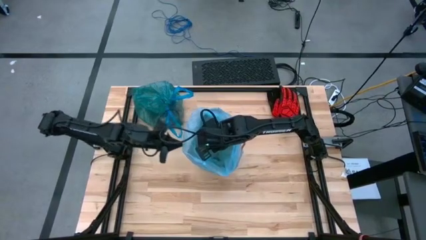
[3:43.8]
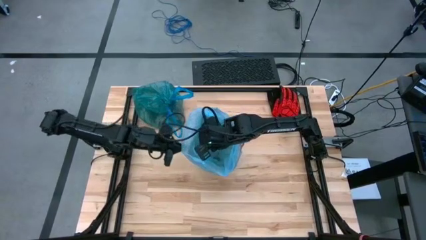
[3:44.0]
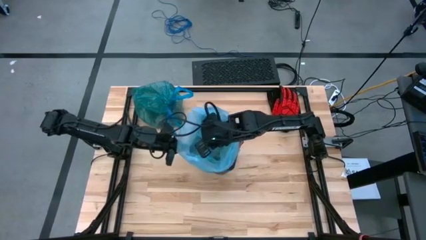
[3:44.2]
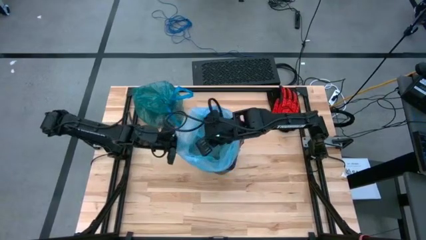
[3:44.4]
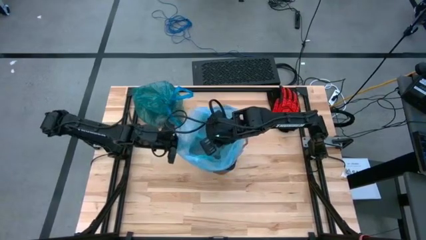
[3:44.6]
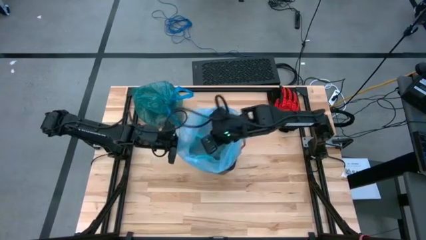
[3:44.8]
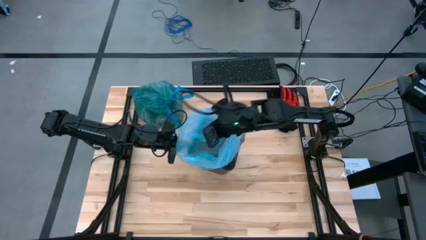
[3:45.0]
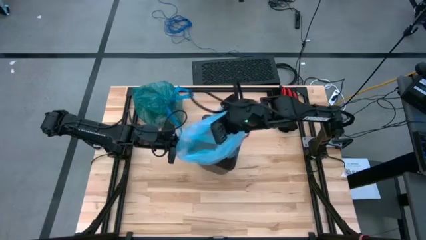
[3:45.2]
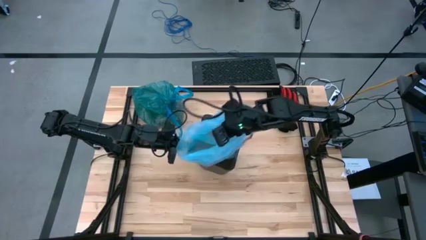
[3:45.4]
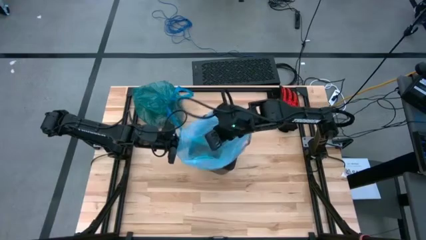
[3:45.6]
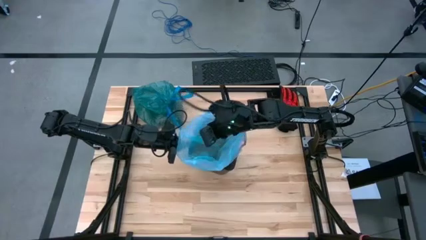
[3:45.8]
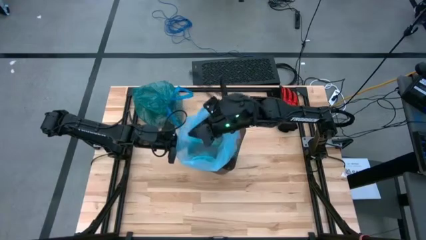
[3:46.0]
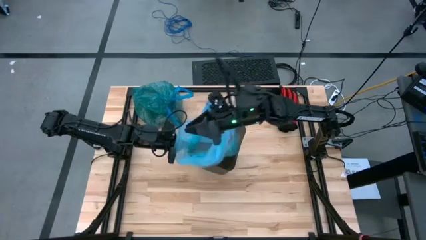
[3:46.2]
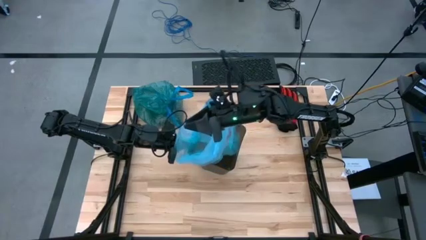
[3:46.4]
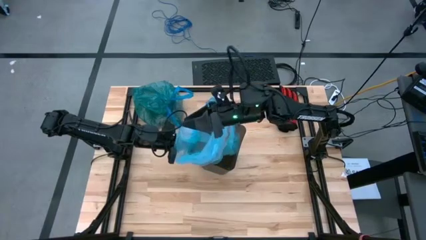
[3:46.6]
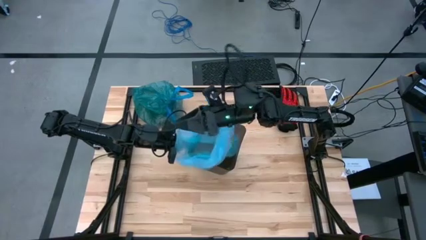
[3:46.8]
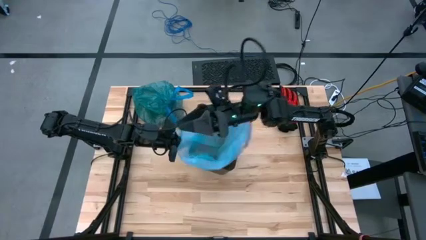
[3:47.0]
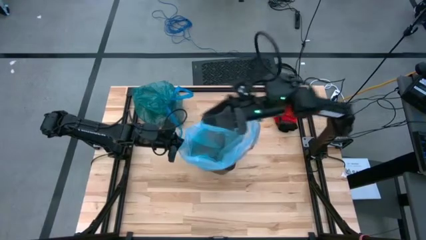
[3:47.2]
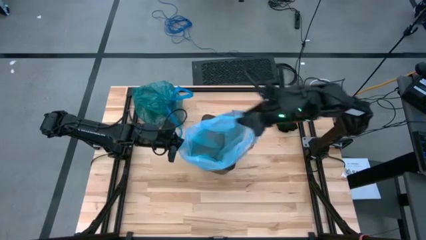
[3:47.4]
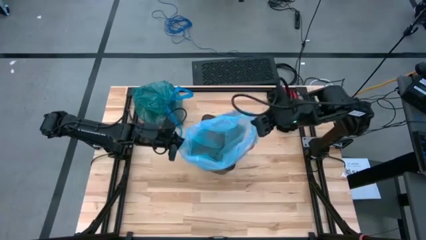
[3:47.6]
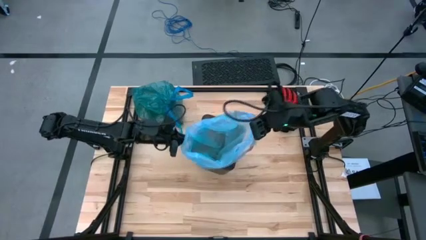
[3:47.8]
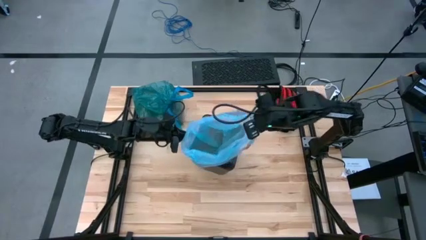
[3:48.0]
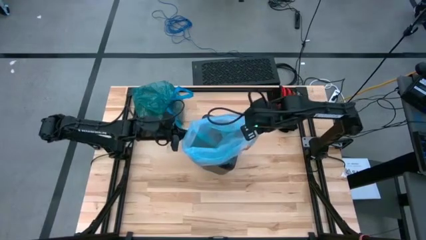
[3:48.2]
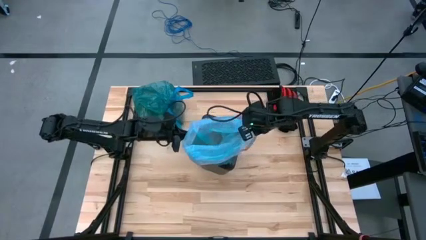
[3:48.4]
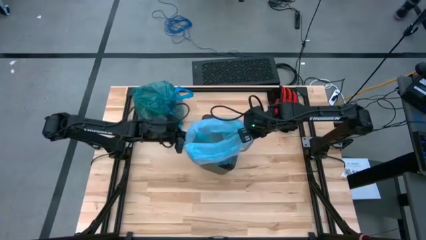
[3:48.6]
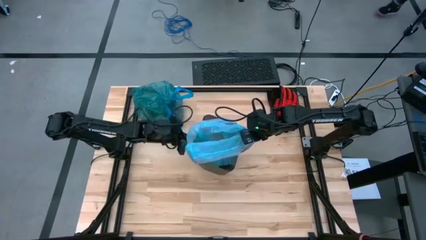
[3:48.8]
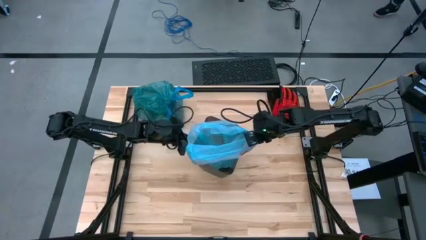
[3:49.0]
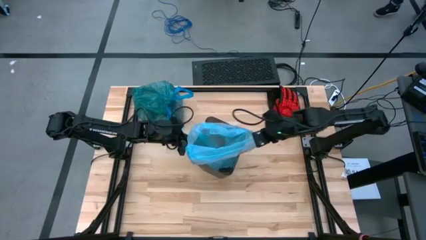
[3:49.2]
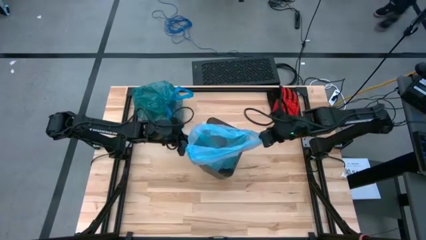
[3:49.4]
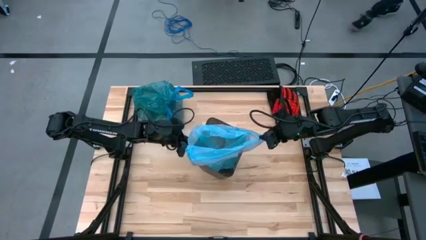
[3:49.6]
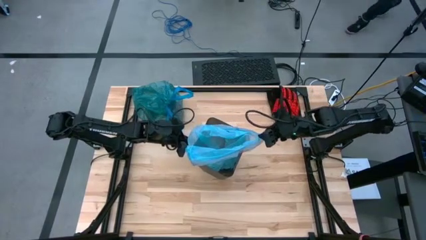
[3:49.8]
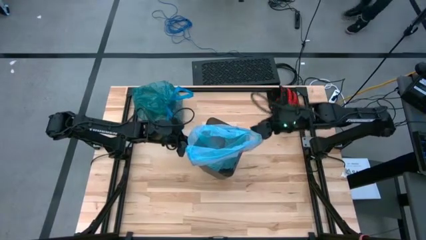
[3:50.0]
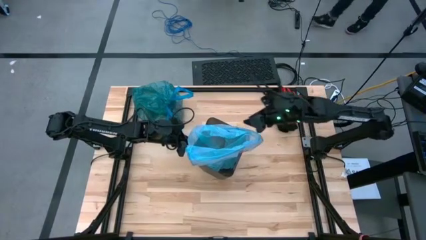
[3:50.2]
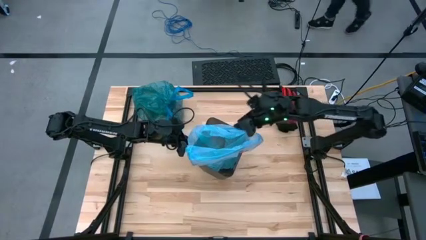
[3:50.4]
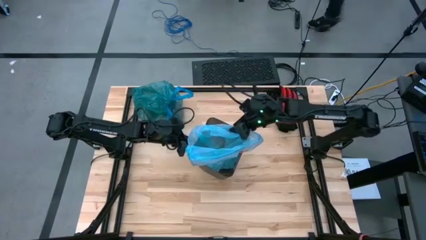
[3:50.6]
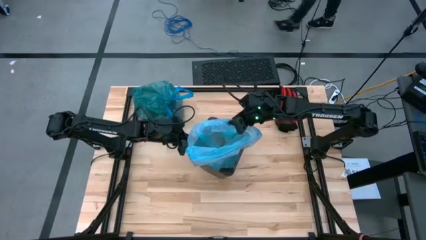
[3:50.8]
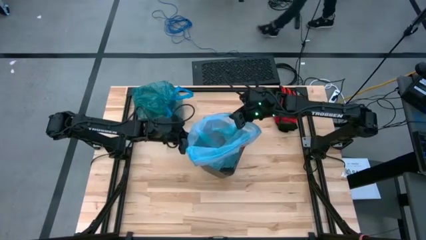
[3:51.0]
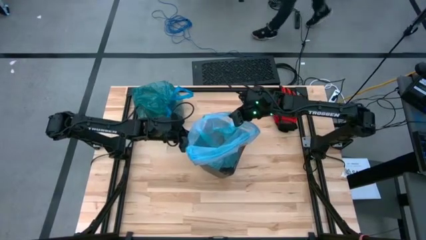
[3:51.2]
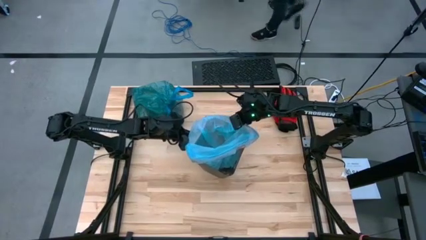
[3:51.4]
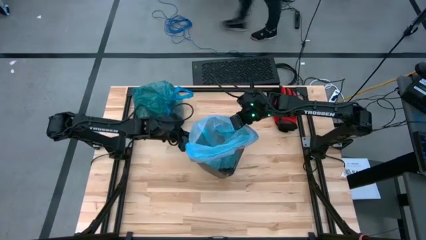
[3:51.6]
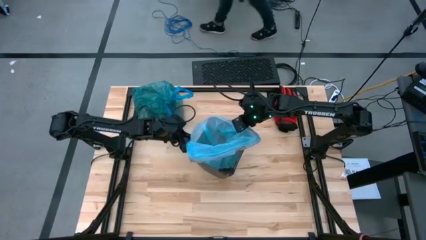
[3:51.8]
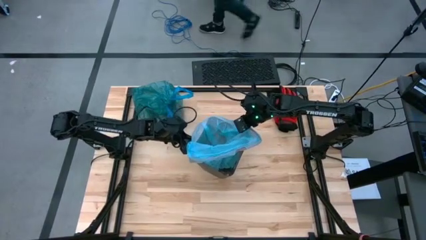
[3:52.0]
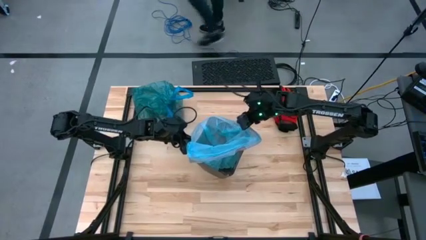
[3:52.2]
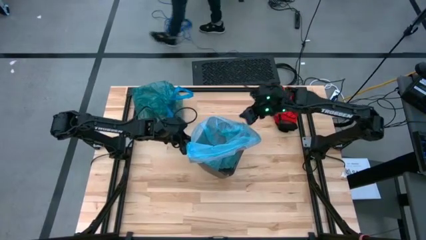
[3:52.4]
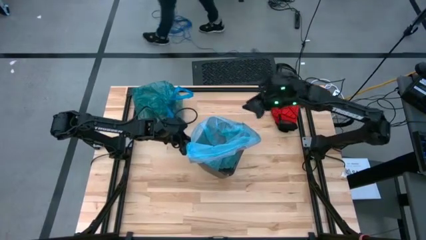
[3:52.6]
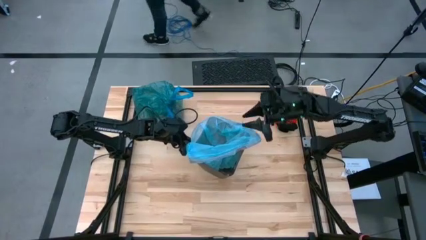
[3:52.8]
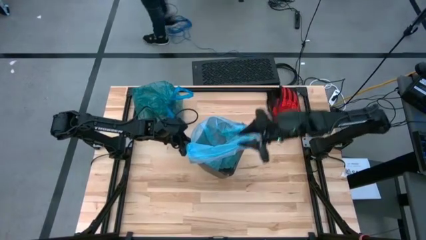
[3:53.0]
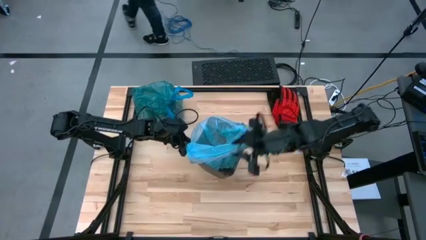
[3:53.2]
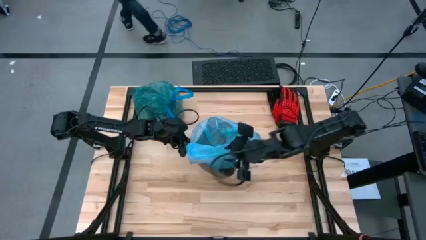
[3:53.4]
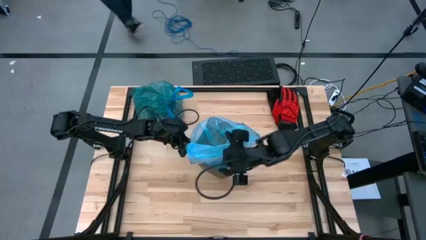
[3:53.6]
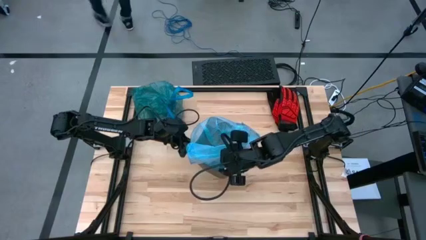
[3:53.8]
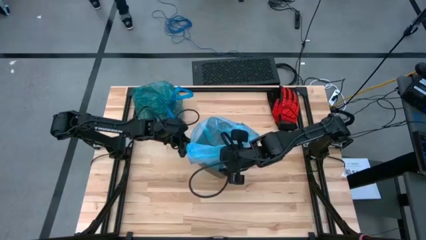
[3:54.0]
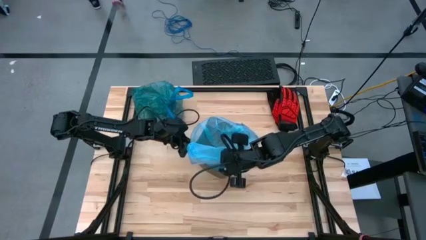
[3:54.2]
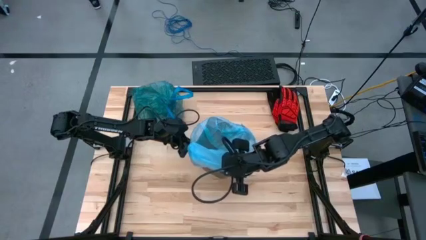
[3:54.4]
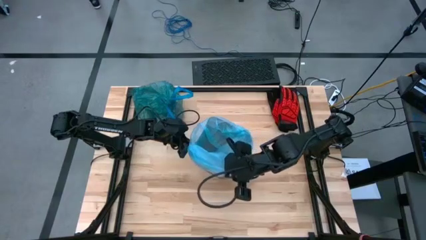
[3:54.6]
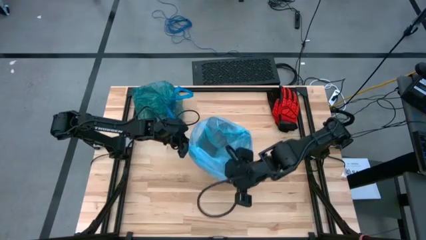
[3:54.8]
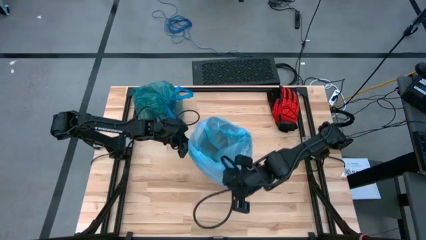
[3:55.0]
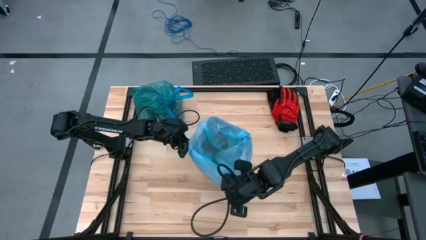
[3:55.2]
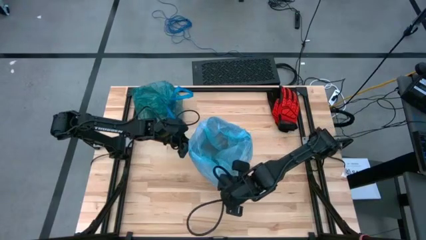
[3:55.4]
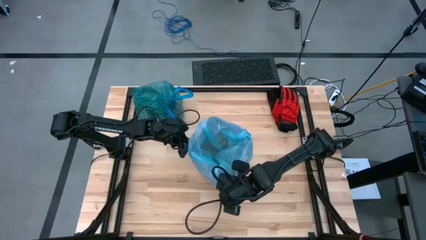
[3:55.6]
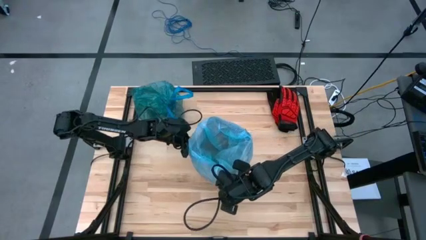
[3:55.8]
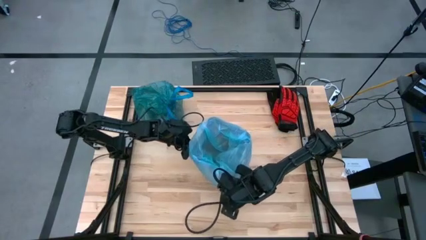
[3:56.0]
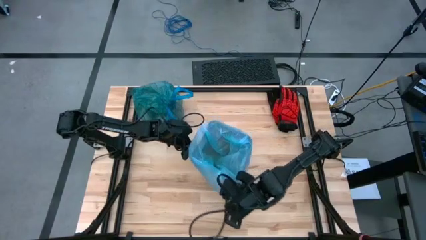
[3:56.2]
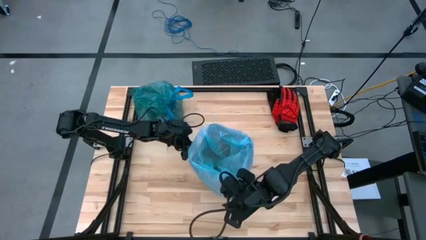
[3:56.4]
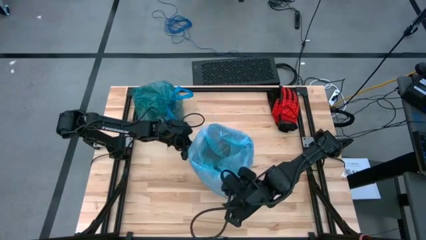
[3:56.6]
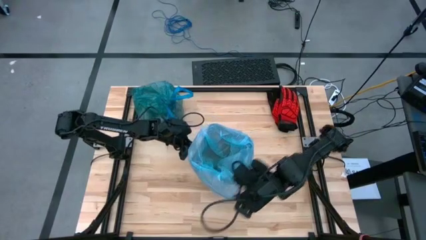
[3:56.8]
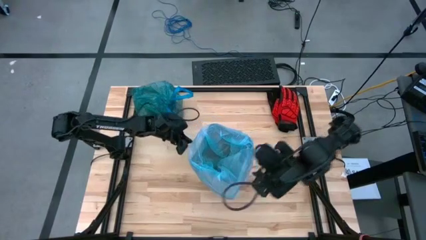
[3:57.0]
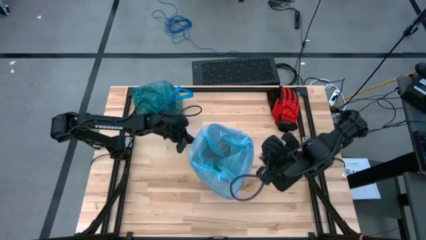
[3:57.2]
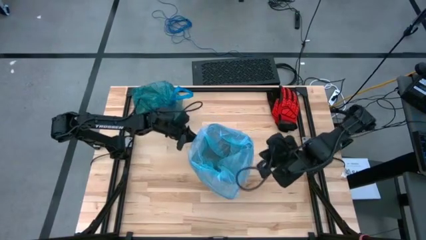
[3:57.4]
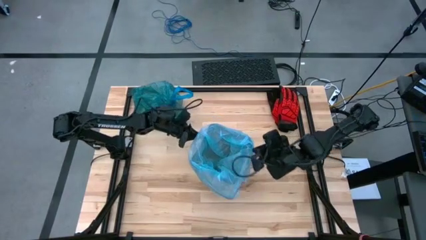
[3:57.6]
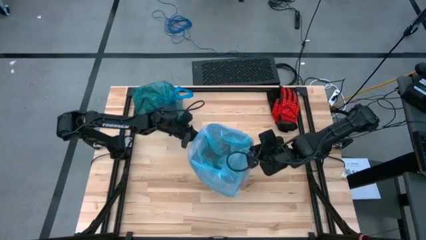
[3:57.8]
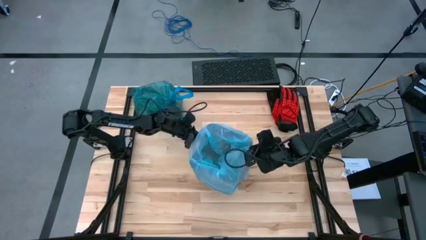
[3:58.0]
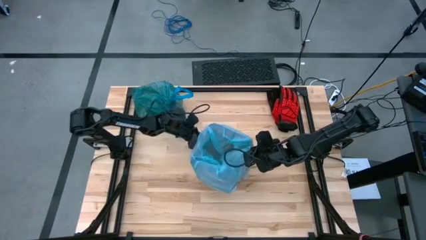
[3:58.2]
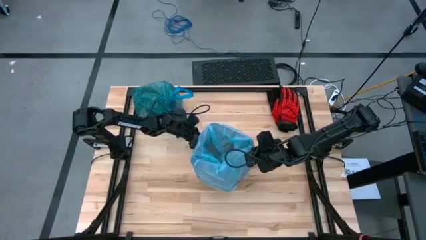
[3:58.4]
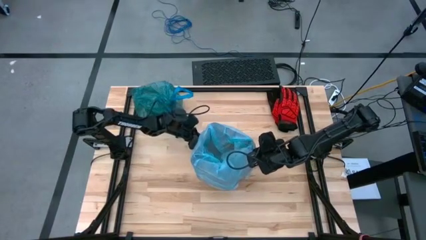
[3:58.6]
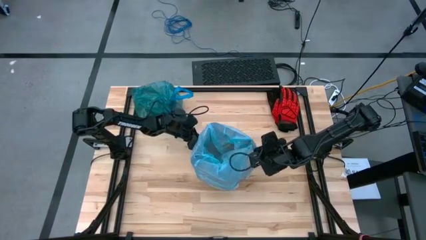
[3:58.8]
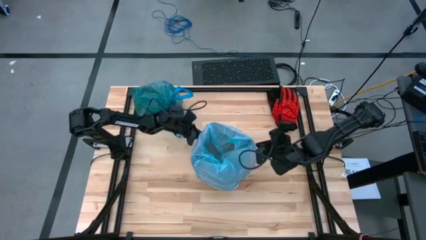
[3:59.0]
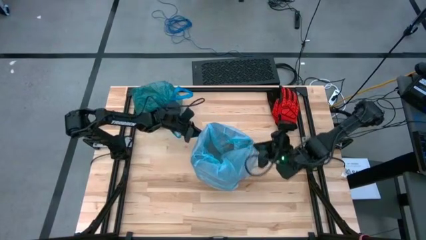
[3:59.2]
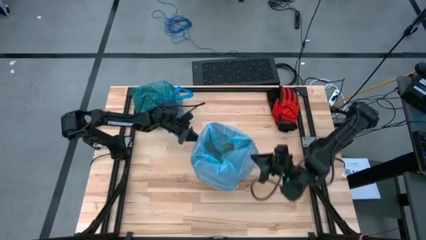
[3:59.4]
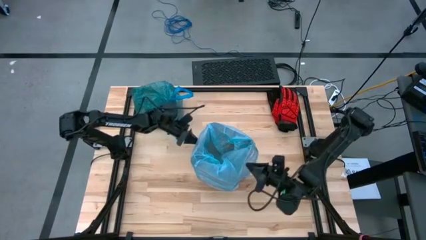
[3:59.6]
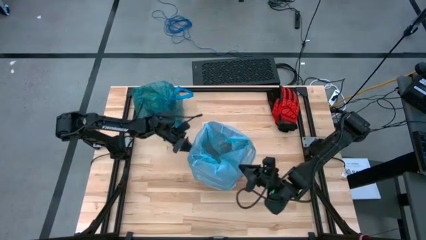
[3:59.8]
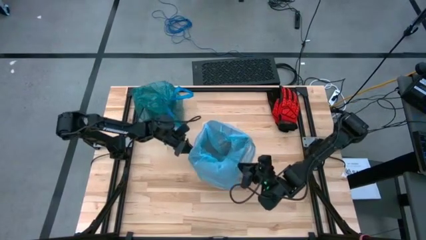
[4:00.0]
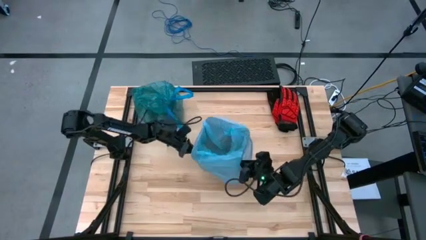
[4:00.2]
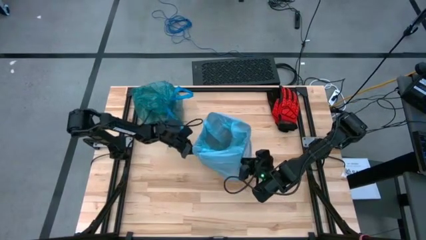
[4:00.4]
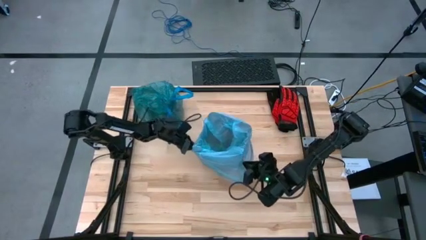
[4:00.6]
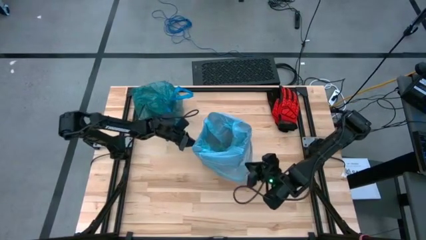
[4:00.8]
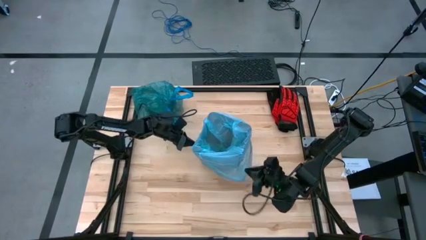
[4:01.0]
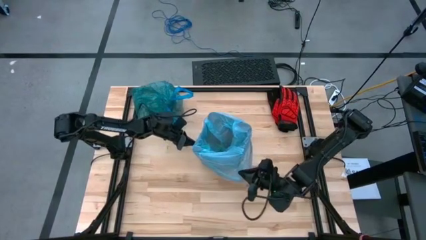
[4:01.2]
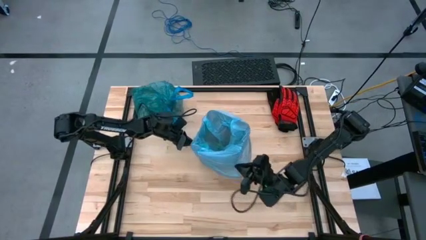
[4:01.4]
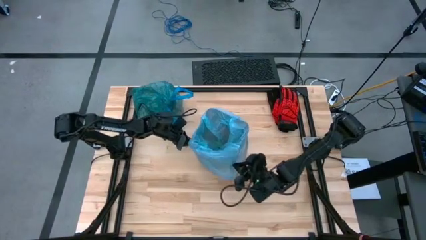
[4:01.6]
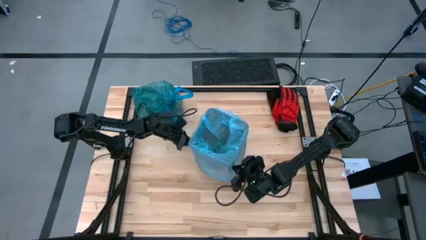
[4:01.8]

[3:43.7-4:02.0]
Task: place trash/remove bag and relplace
Insert the new blue trash bag into the trash bin
